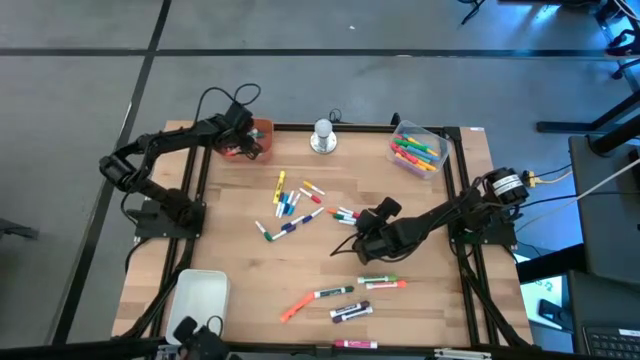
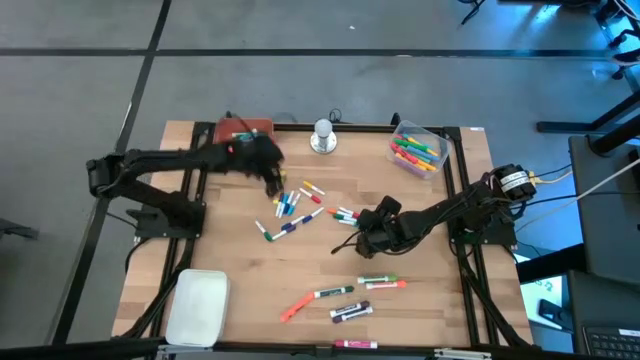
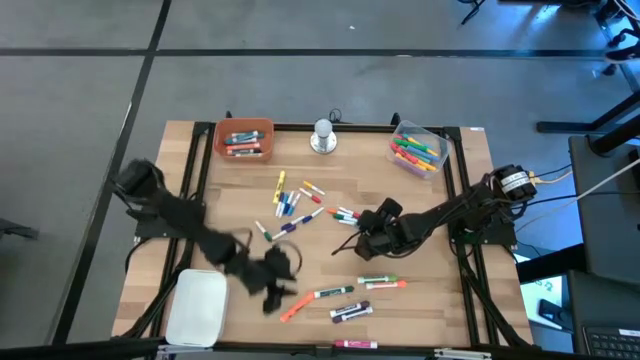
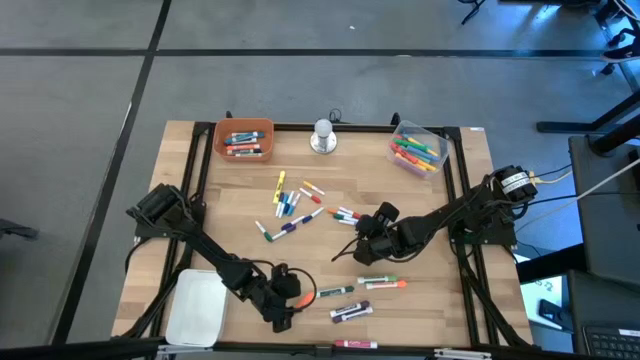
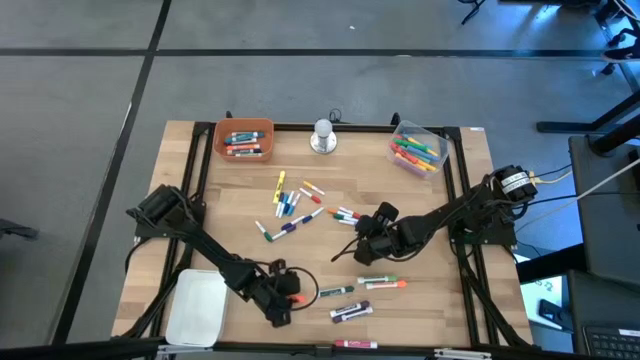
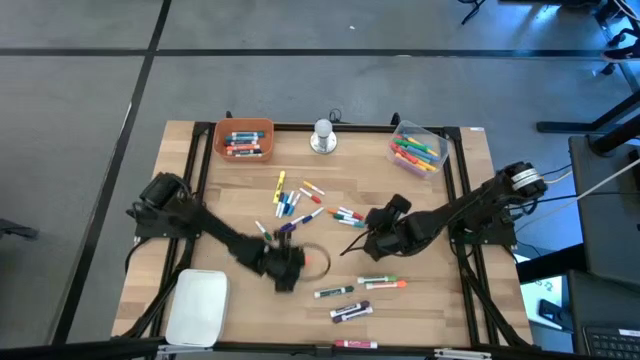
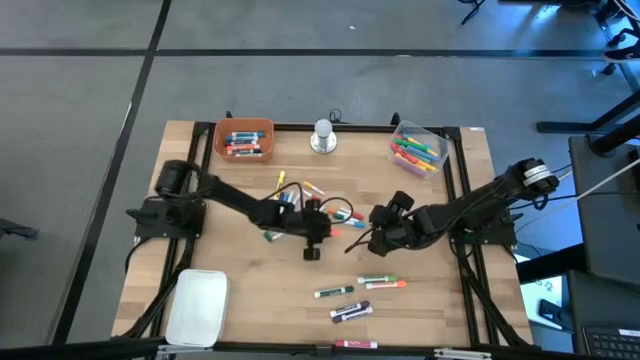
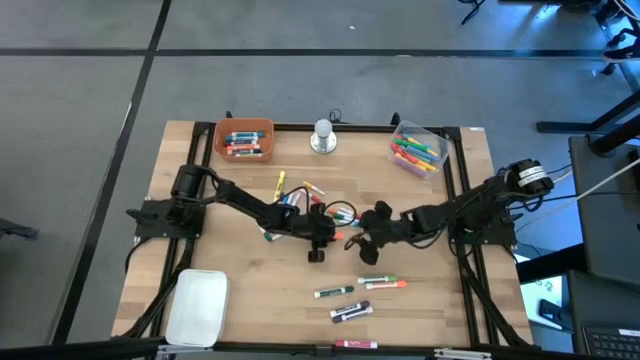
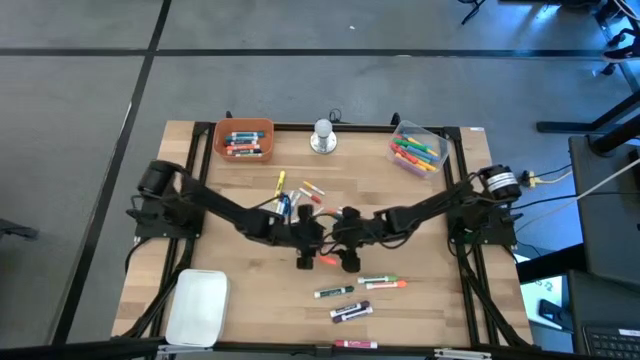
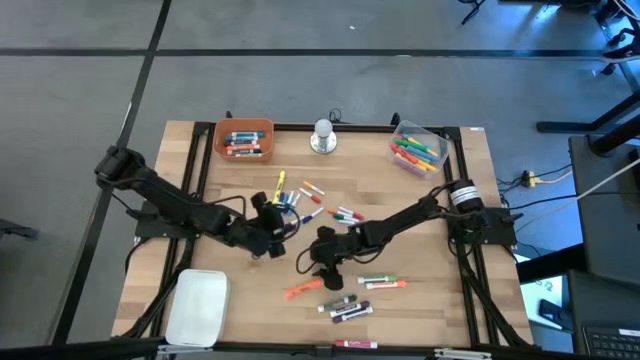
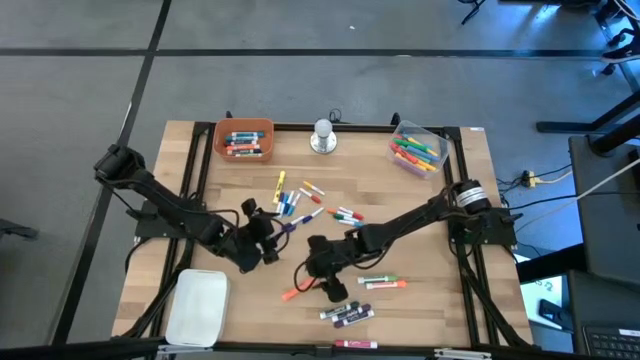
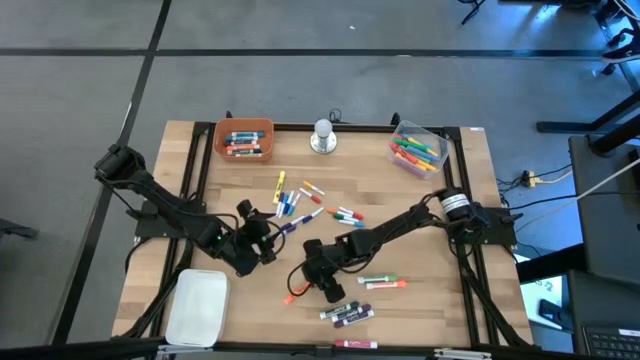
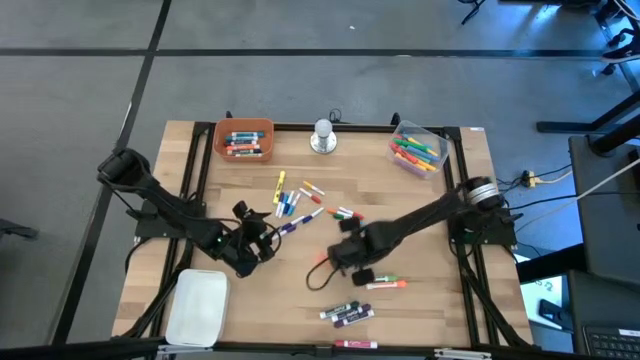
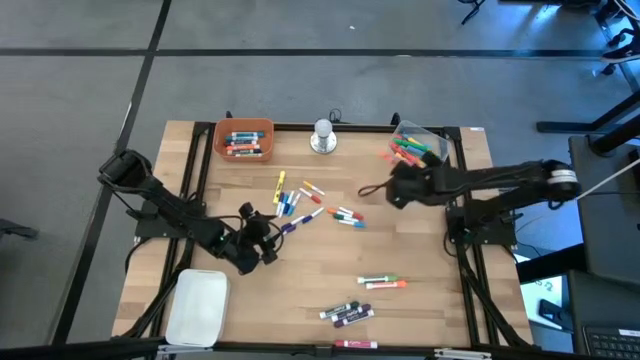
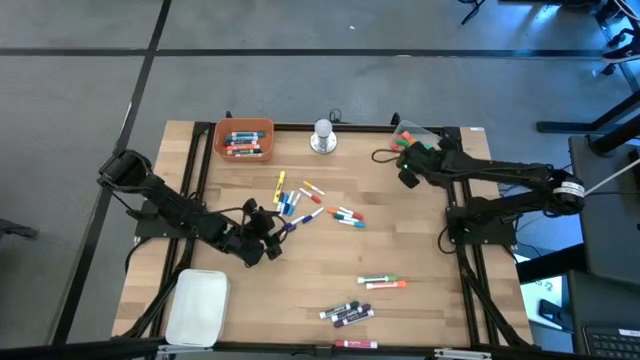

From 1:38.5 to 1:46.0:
Task: Pick & Place Markers
Put the large orange highlighter pen into the transparent bin

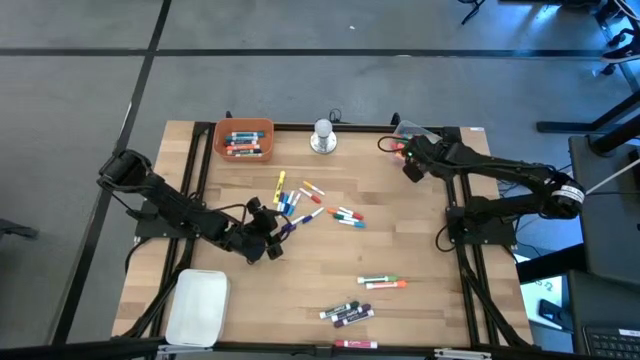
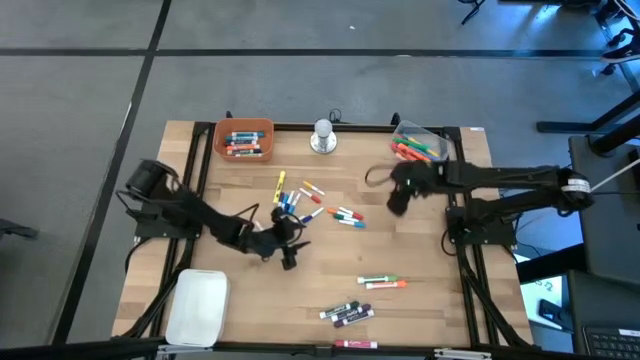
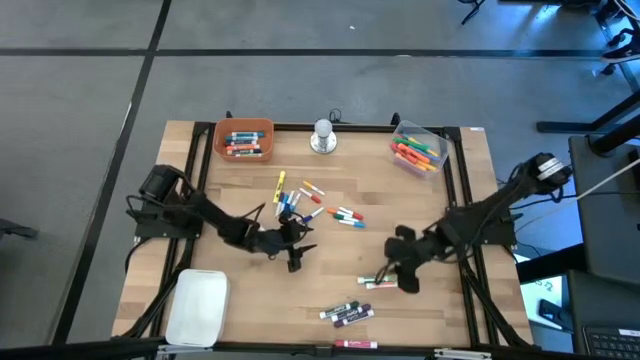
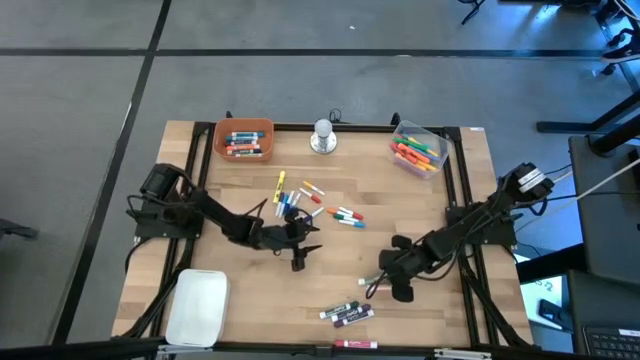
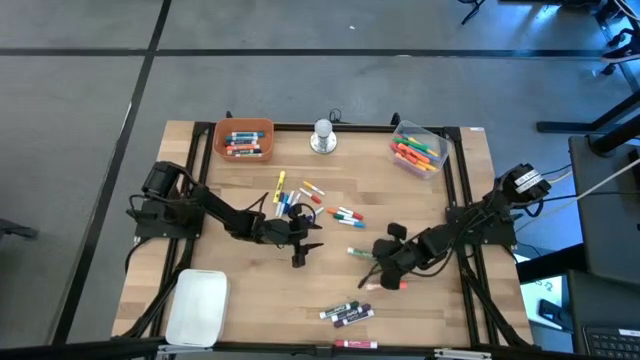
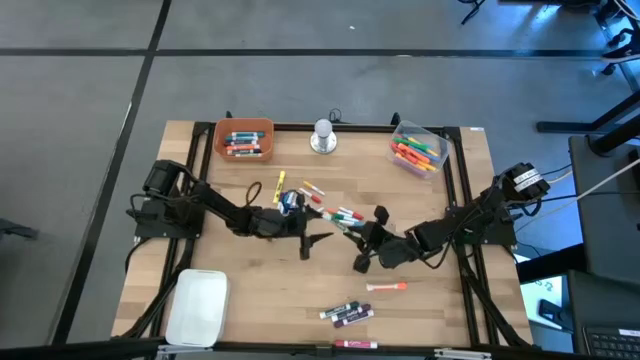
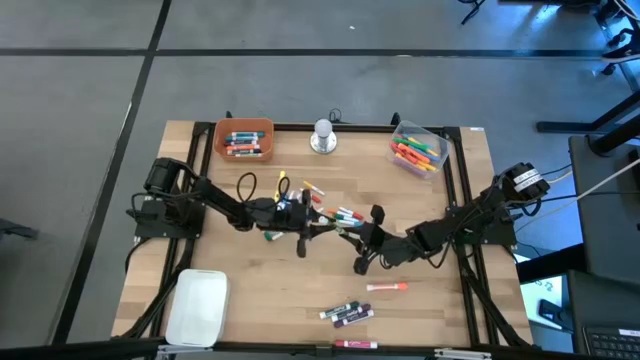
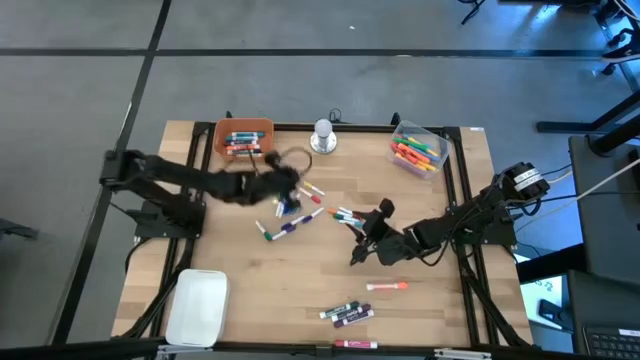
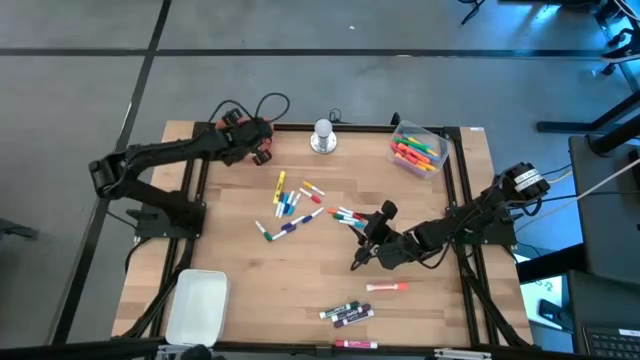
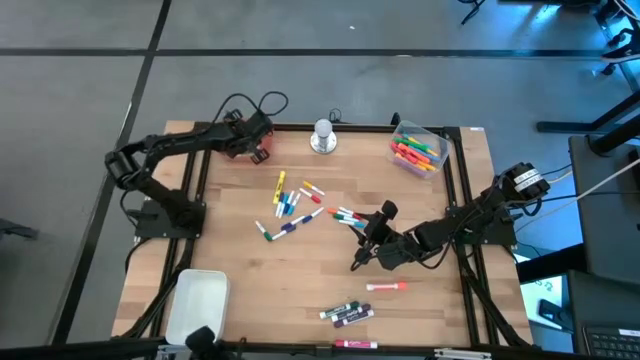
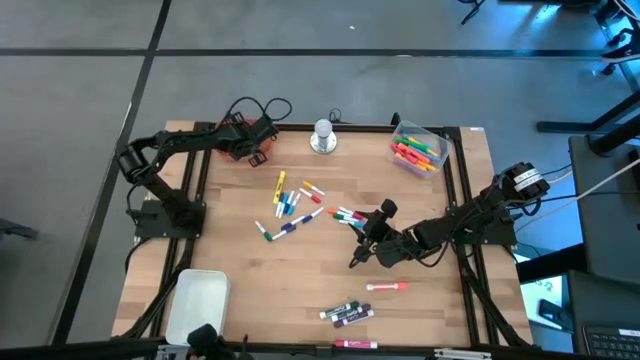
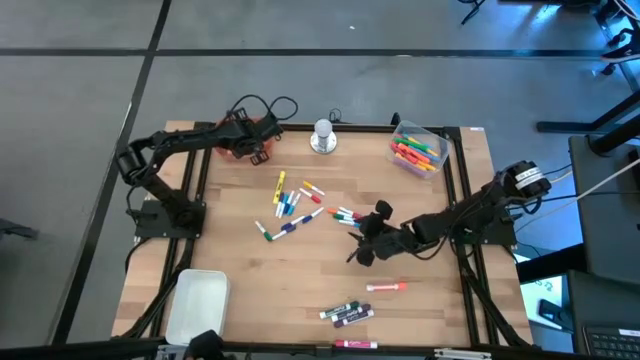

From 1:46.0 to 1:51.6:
Put the light green marker pen into the orange bin

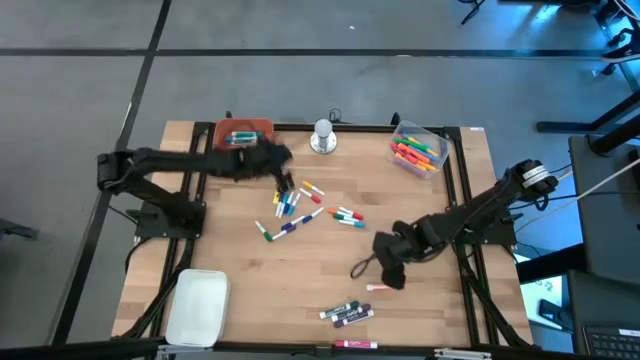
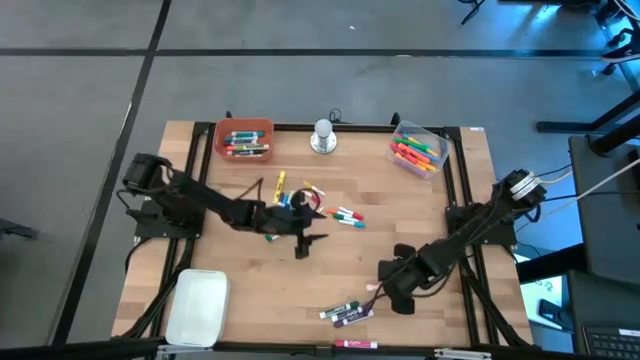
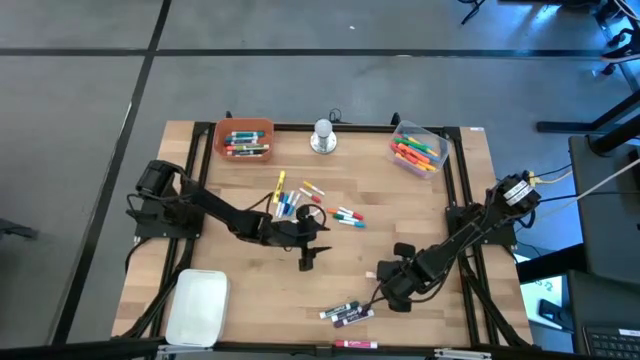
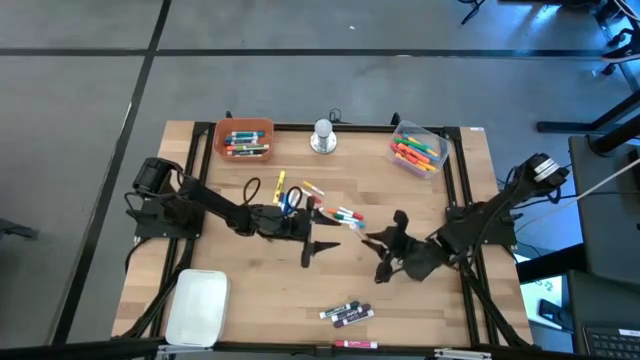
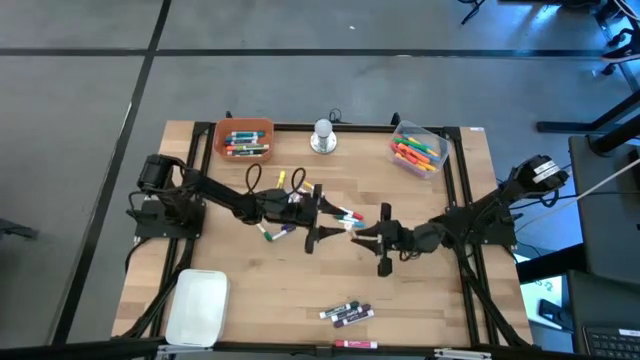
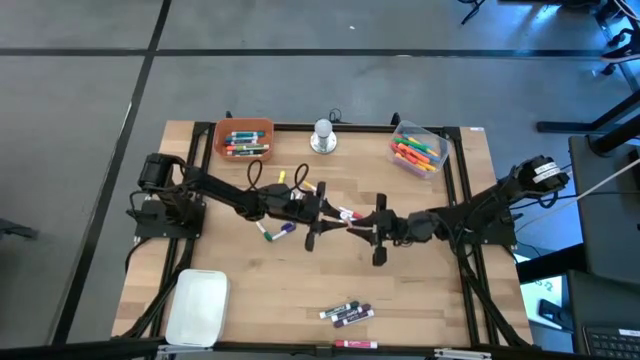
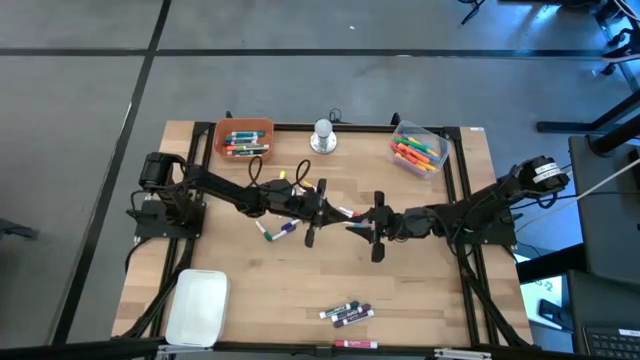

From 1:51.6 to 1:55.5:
Put the orange marker pen into the orange bin

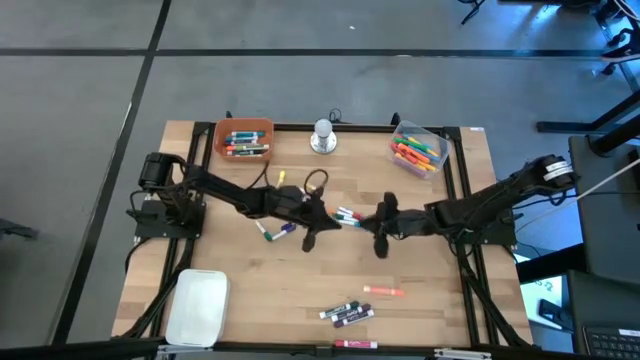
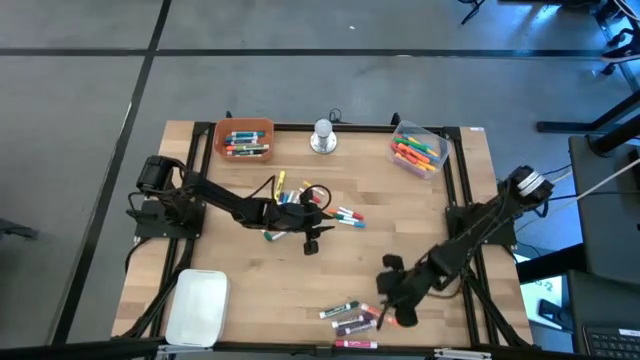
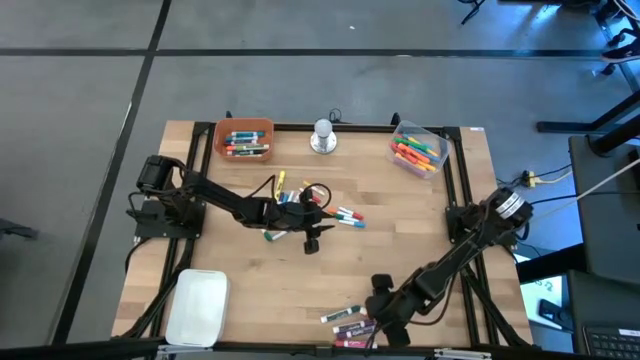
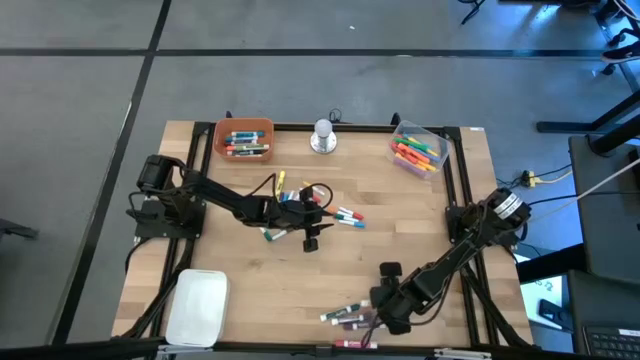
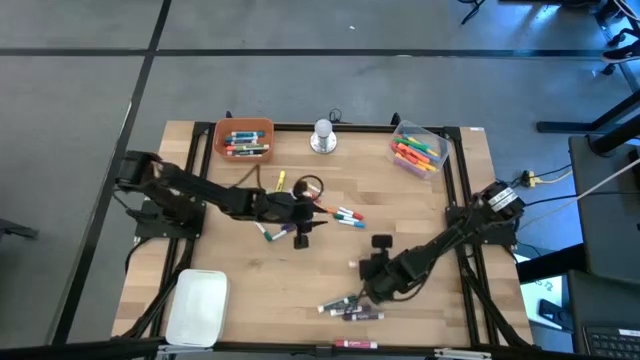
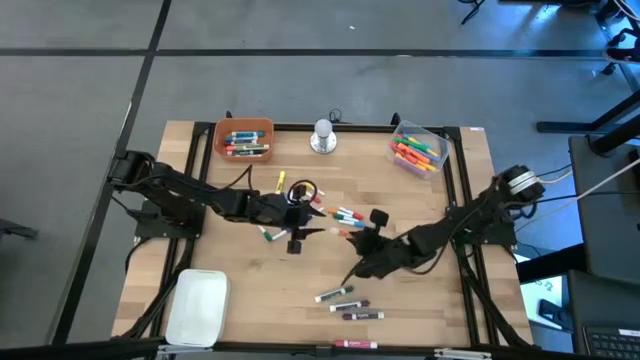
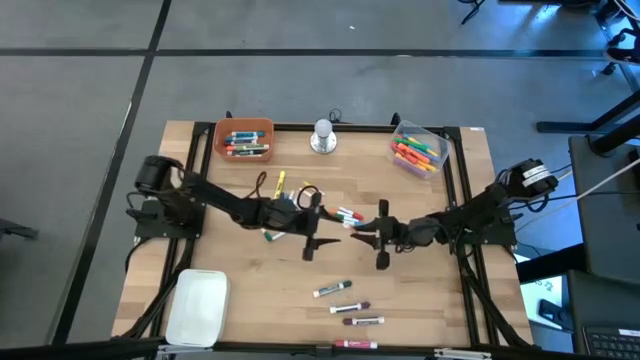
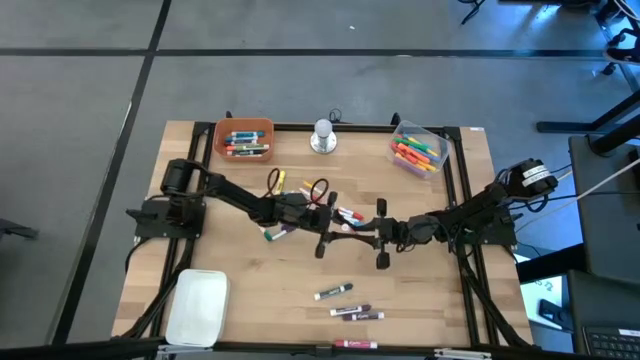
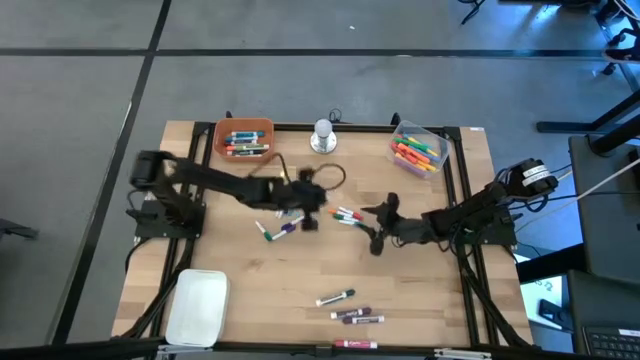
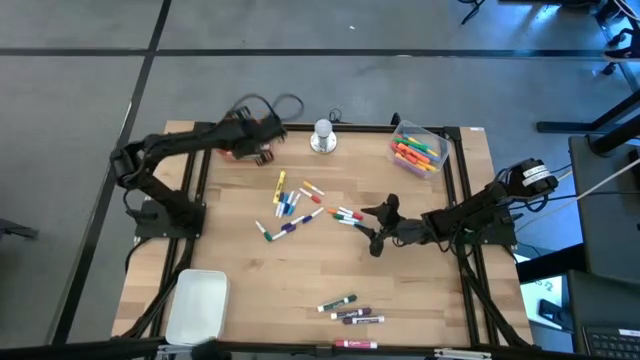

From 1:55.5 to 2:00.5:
Put the orange marker pen into the orange bin
